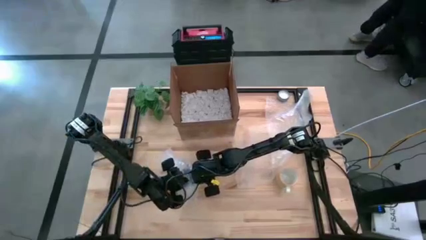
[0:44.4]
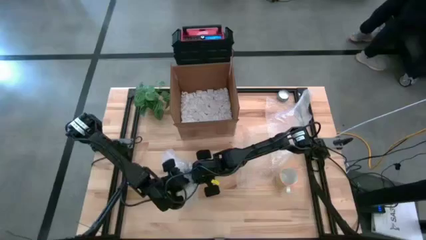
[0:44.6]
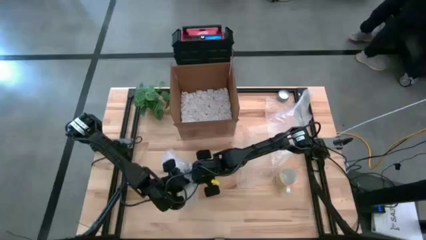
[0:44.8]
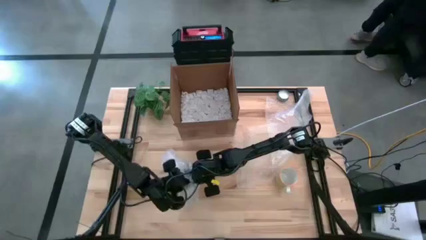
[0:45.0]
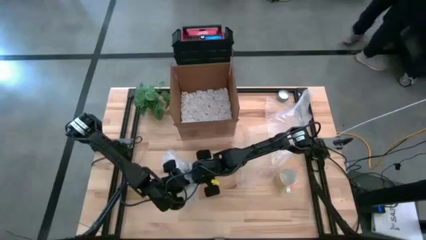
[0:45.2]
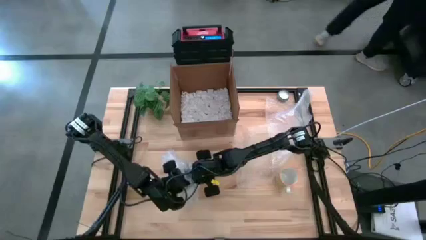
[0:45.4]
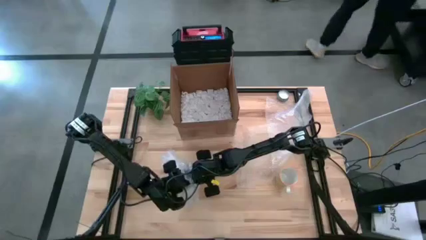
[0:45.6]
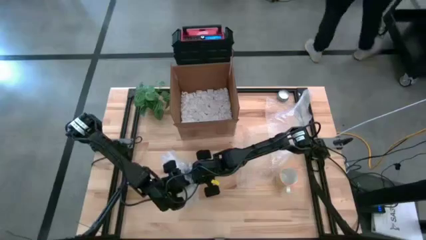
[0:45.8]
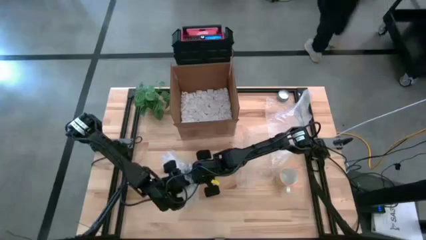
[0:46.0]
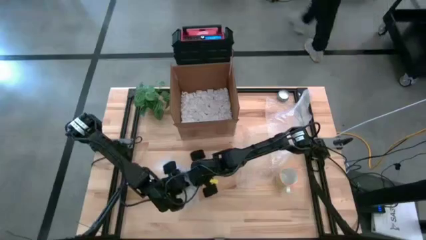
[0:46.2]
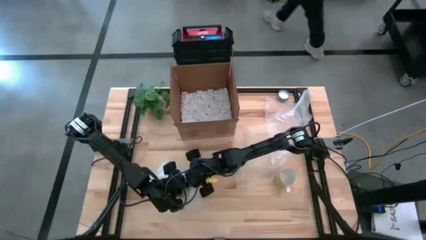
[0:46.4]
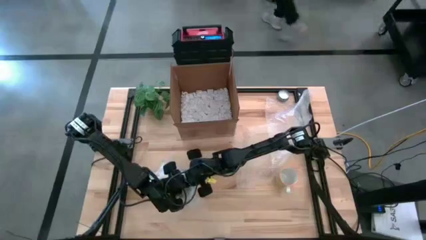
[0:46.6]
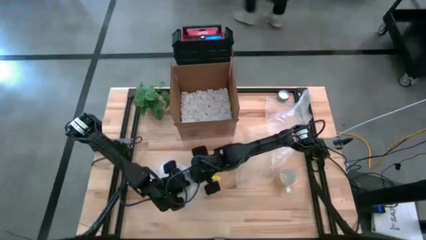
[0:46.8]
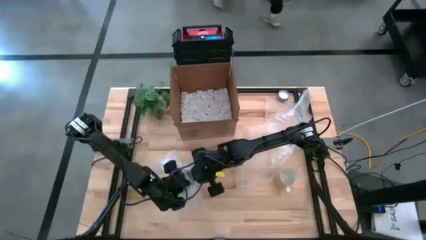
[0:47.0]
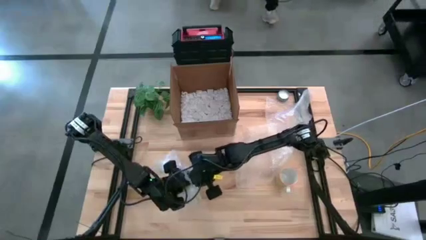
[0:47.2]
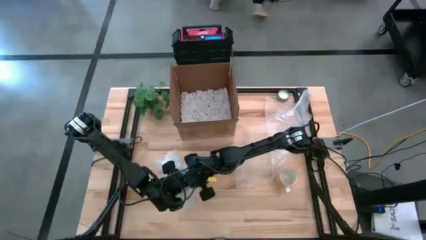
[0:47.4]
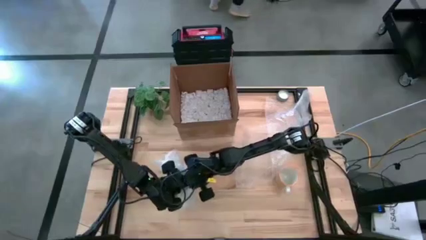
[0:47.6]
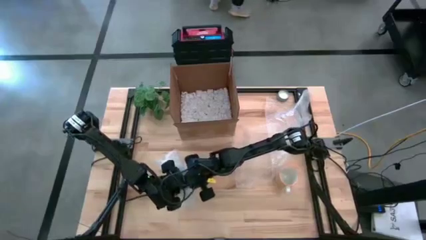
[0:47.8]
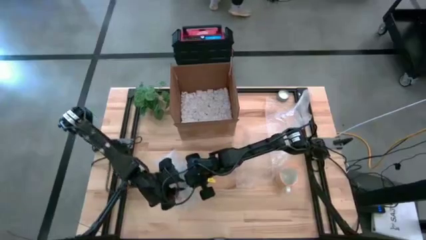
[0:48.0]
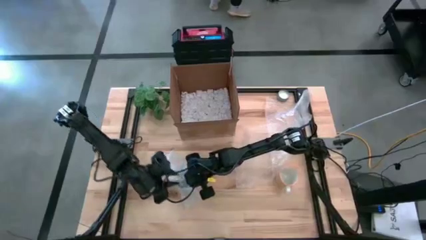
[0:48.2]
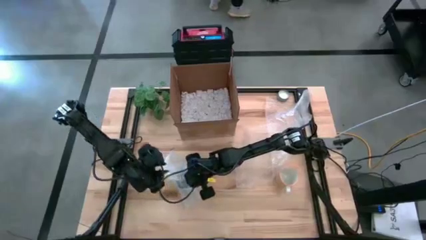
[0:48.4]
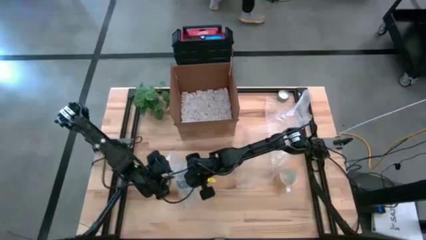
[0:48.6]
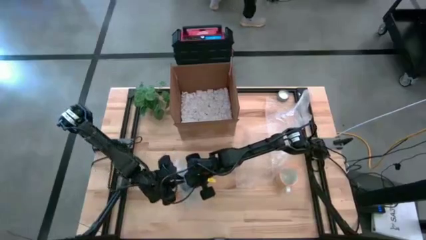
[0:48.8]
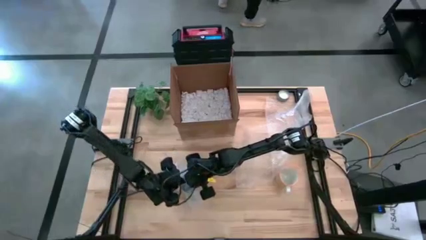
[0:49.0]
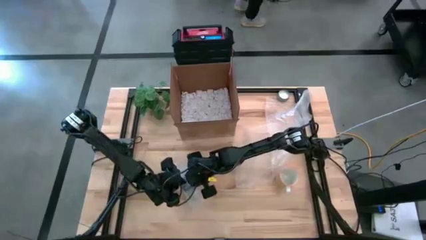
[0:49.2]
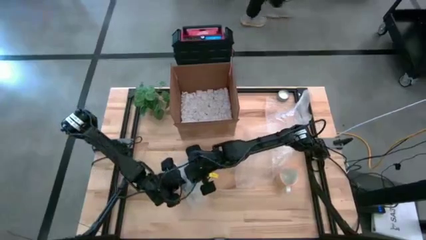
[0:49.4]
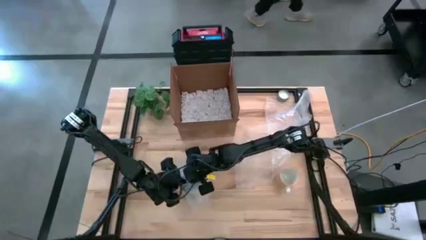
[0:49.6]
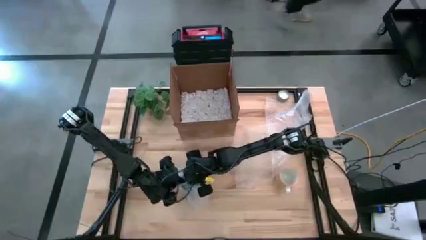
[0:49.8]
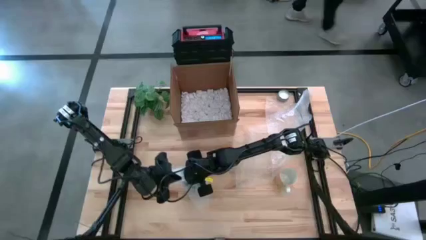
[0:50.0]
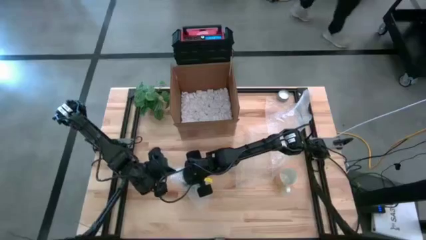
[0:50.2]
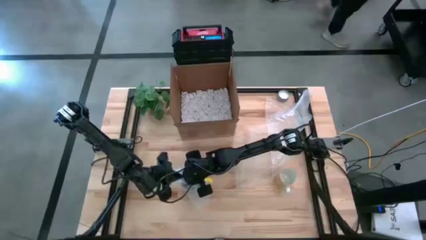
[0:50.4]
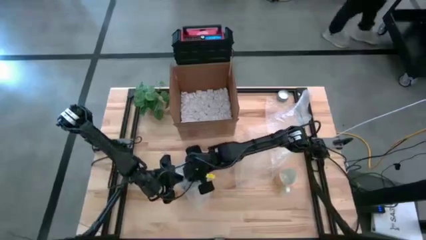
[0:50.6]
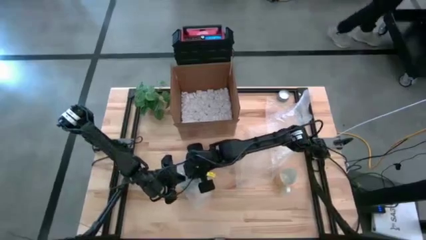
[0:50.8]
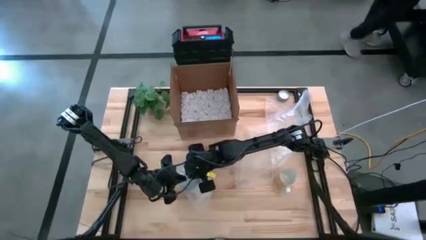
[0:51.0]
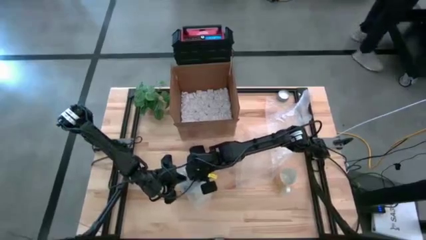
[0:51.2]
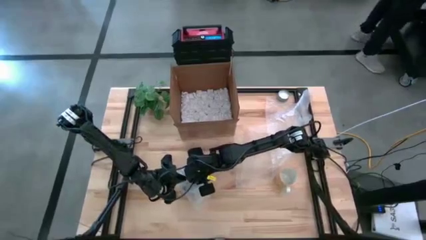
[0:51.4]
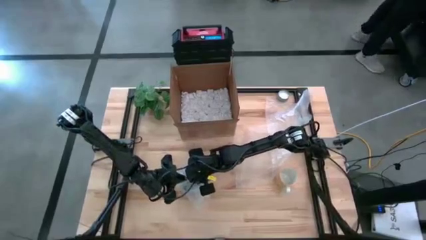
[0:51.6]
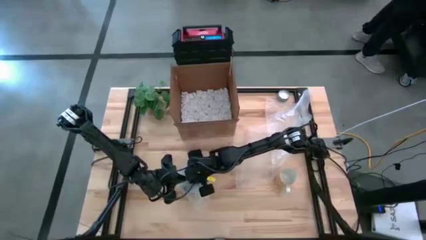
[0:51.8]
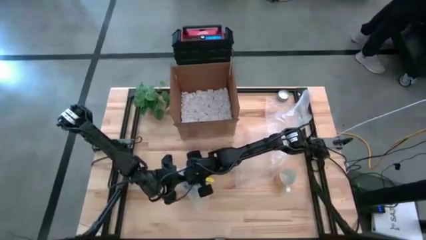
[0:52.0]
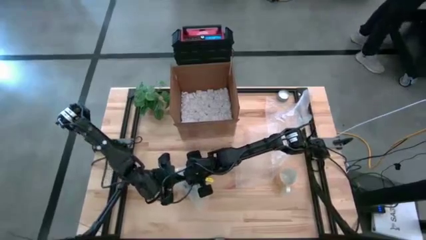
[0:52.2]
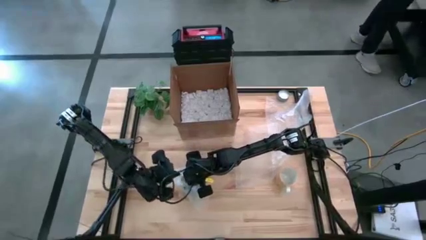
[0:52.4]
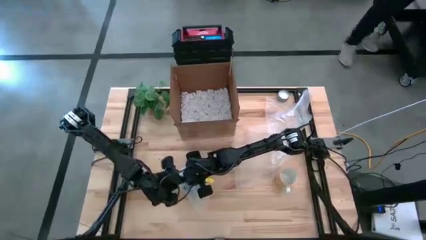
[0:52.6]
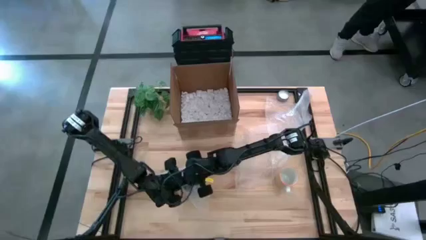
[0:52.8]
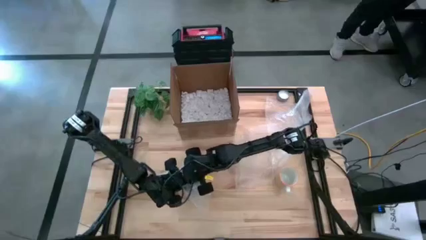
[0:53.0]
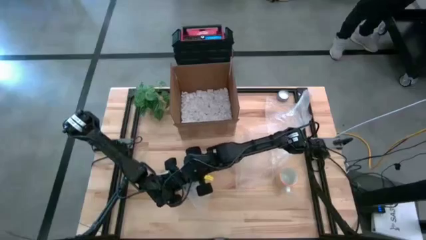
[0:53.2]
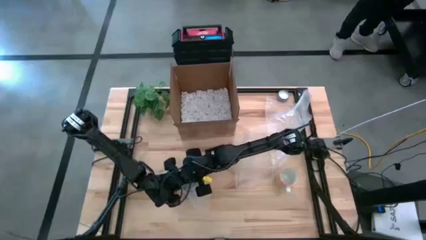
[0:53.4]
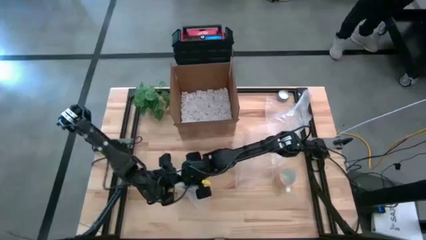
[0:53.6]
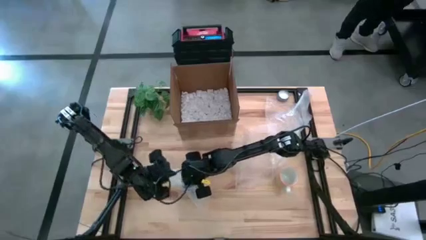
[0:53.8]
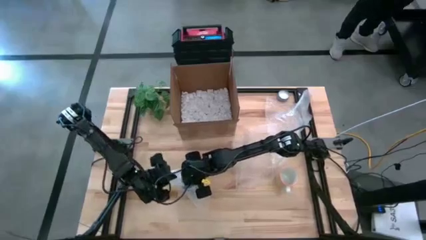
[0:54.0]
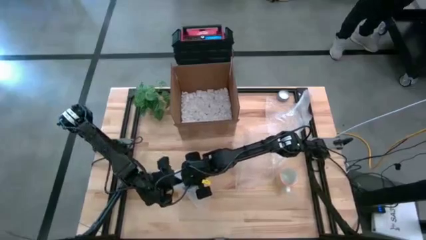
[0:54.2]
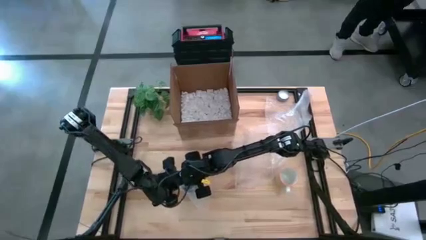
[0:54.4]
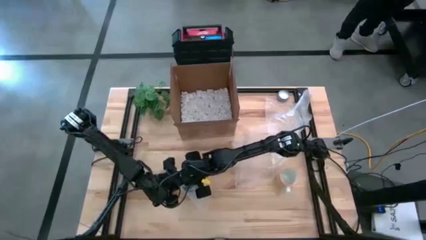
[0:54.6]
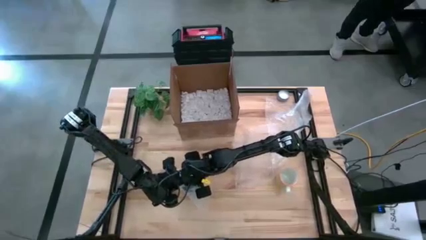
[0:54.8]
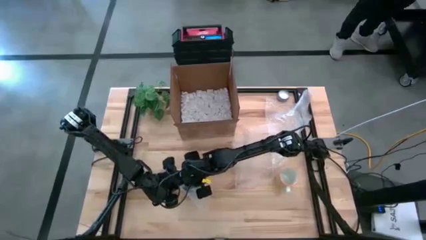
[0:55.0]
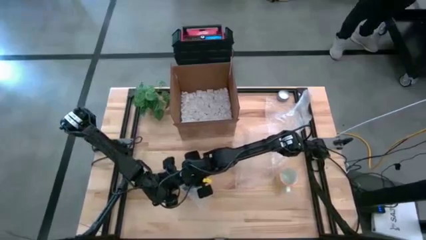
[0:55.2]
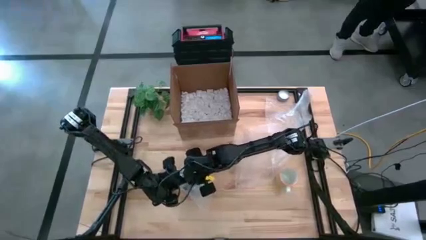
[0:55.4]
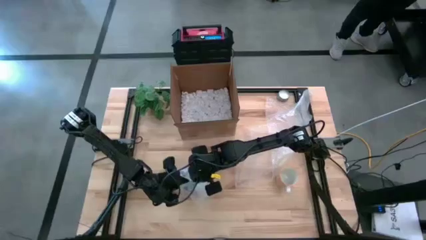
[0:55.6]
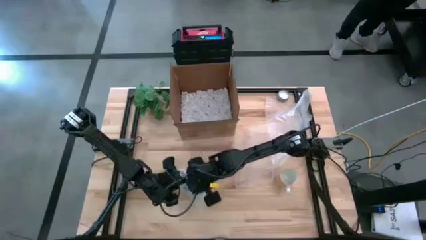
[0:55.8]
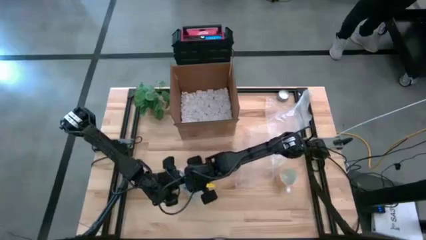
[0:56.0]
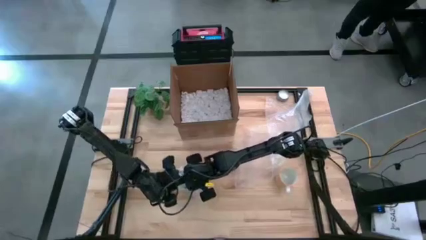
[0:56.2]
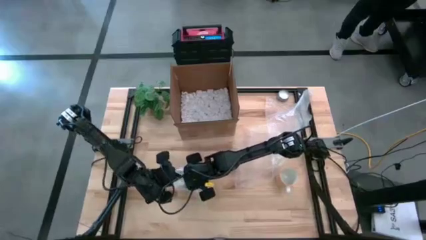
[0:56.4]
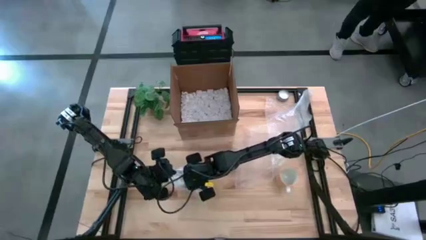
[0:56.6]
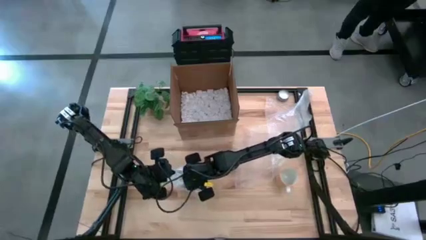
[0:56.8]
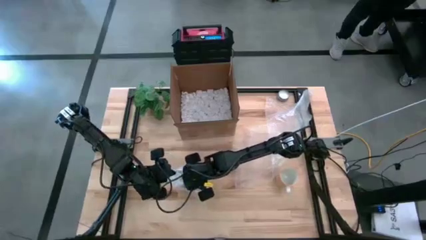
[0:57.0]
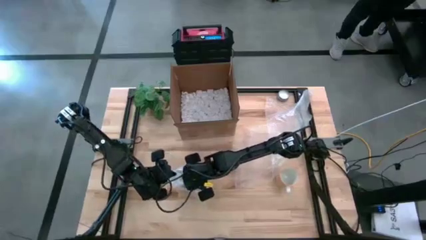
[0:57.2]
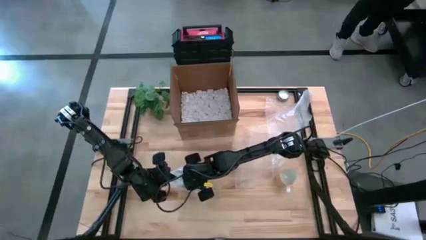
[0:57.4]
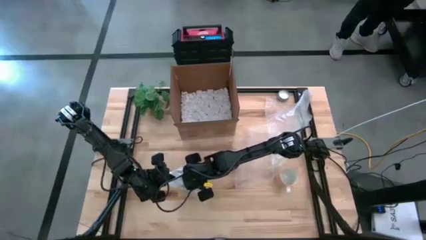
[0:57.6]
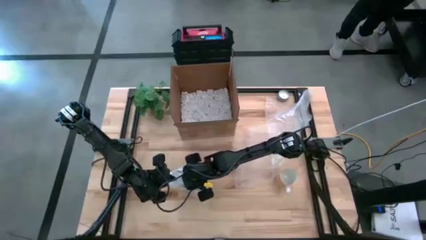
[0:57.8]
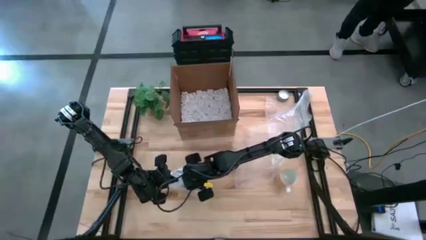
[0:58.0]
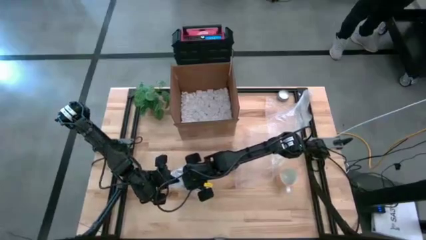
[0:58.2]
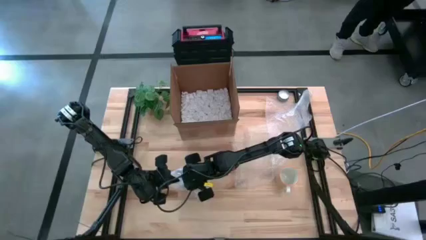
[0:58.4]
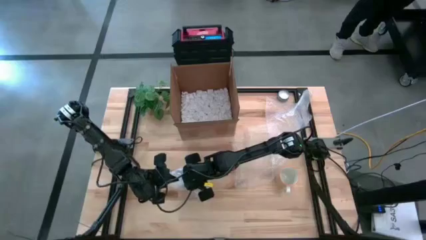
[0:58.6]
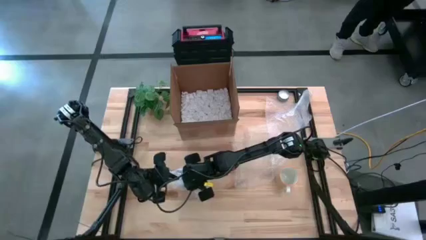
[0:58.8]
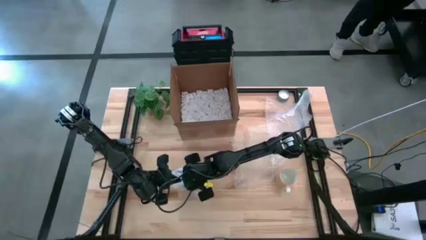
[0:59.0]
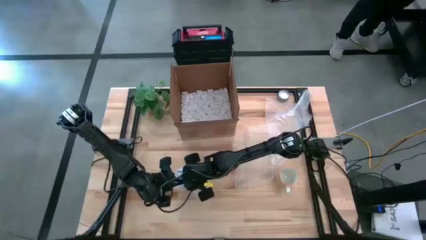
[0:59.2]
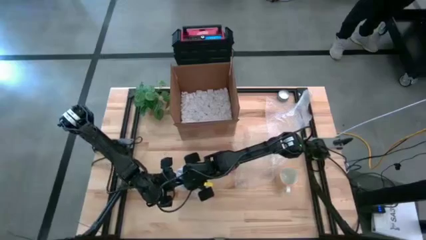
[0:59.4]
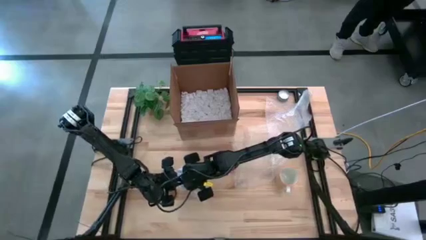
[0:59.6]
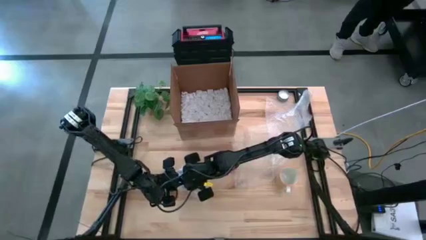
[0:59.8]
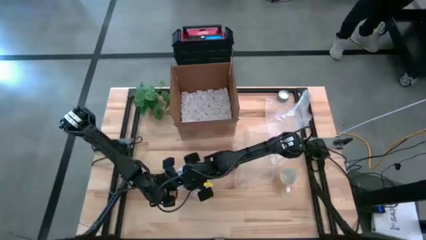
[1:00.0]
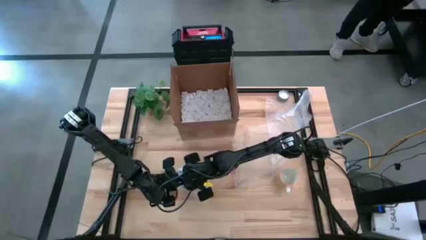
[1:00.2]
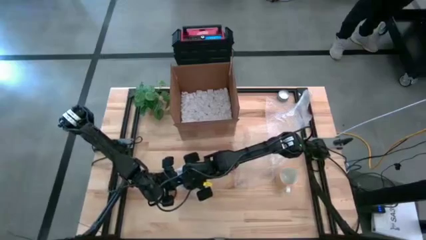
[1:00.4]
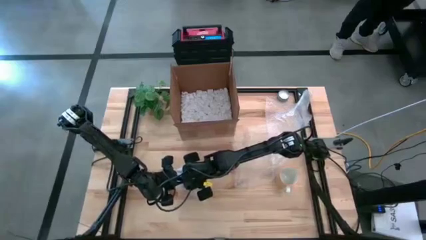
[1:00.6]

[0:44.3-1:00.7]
Task: wrap mug
Wrap the blue mug using the left bubble wrap
